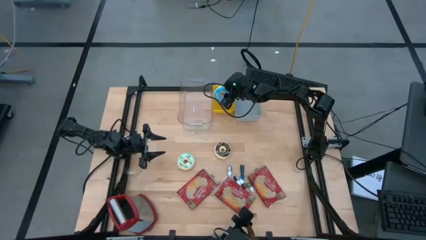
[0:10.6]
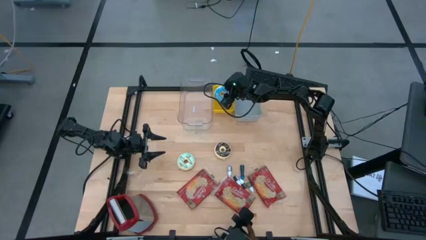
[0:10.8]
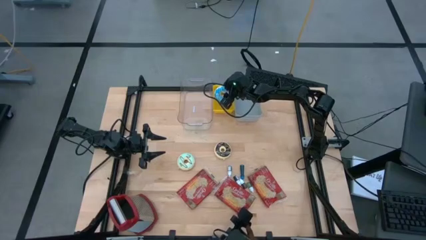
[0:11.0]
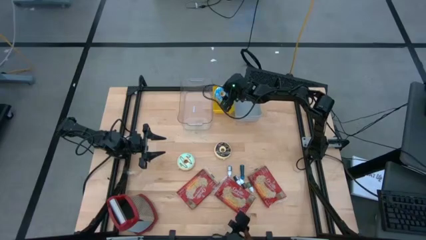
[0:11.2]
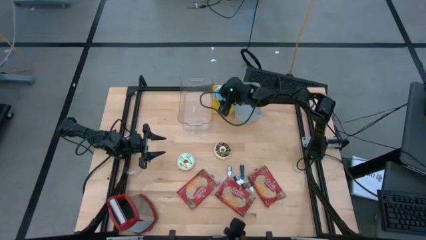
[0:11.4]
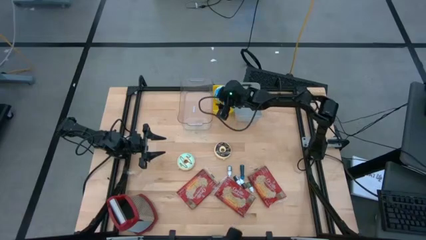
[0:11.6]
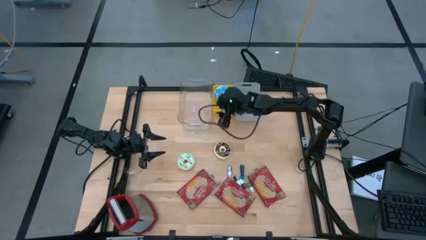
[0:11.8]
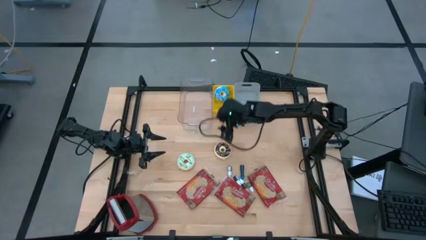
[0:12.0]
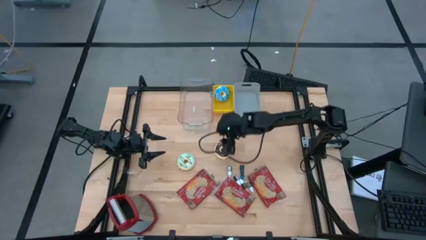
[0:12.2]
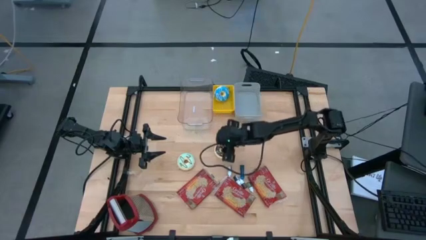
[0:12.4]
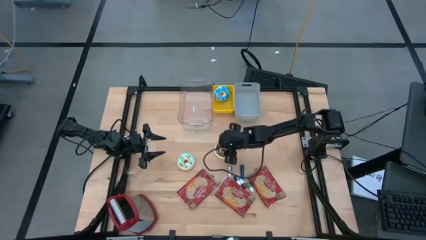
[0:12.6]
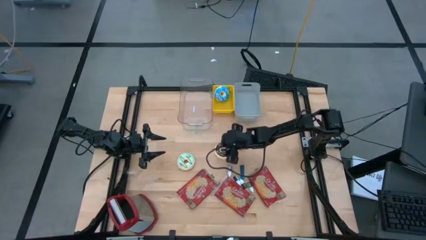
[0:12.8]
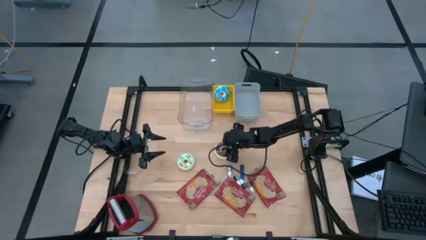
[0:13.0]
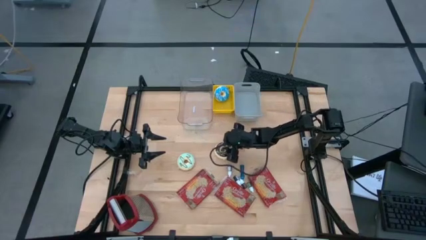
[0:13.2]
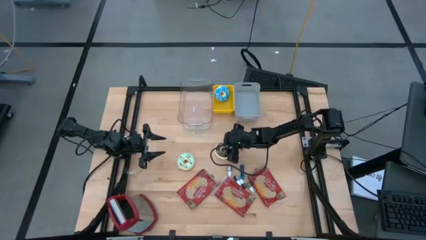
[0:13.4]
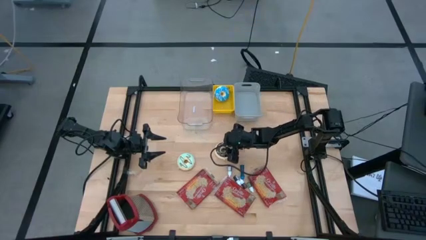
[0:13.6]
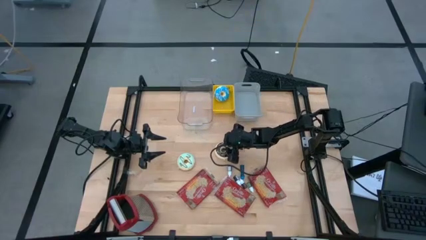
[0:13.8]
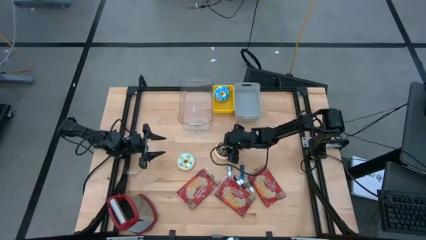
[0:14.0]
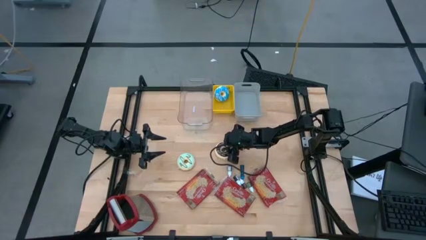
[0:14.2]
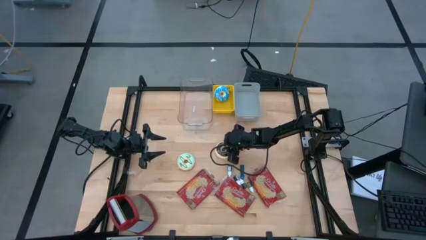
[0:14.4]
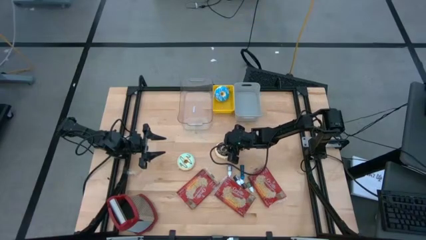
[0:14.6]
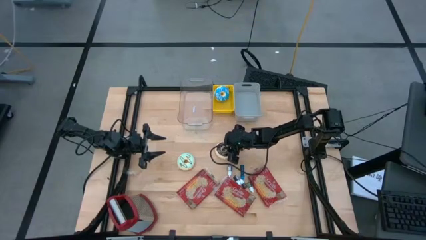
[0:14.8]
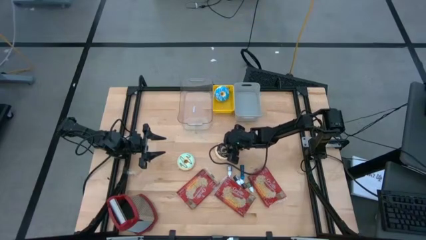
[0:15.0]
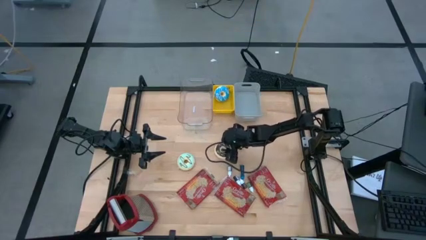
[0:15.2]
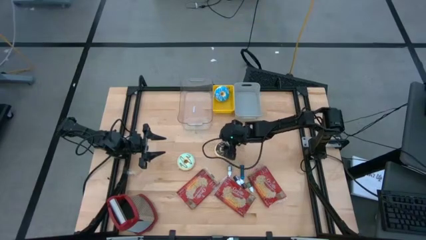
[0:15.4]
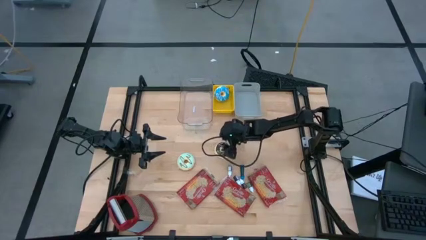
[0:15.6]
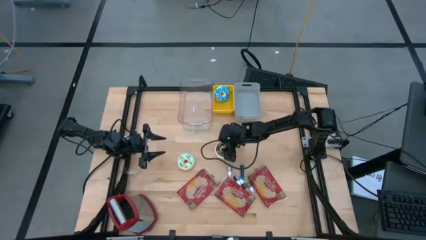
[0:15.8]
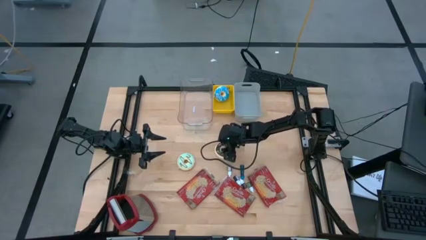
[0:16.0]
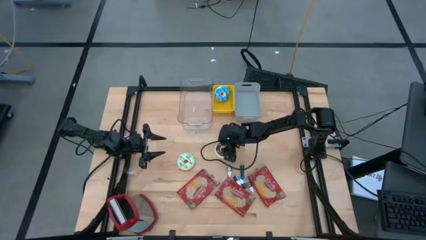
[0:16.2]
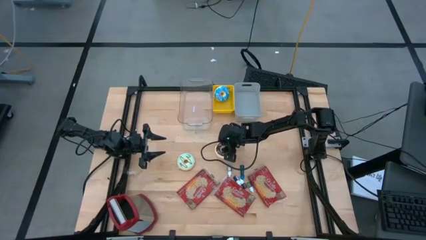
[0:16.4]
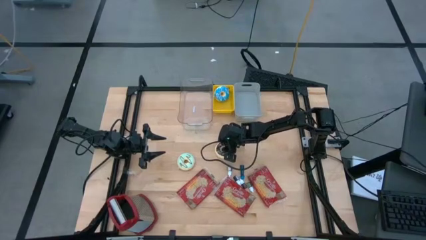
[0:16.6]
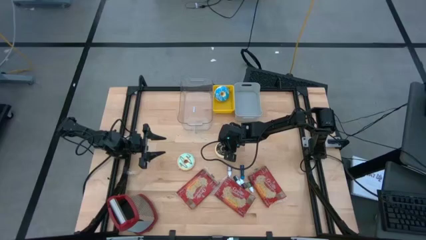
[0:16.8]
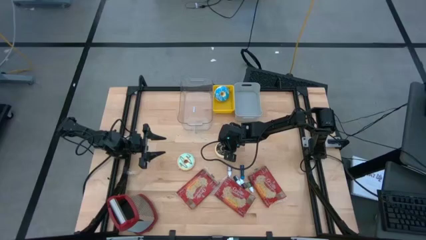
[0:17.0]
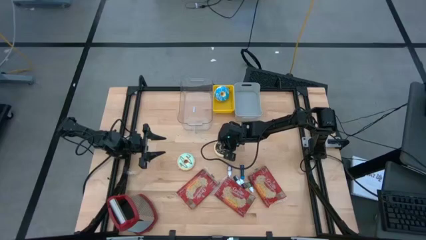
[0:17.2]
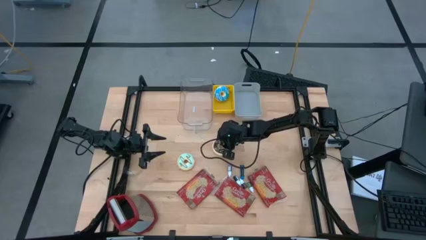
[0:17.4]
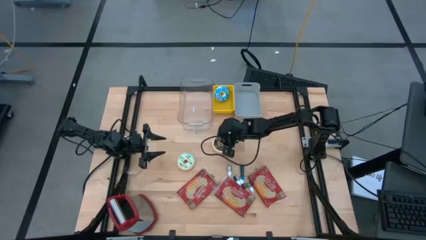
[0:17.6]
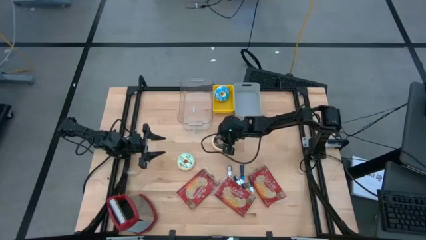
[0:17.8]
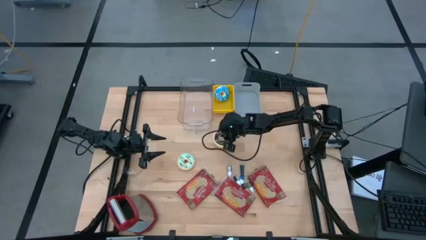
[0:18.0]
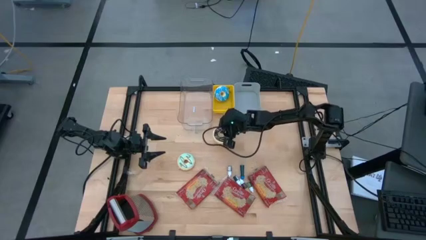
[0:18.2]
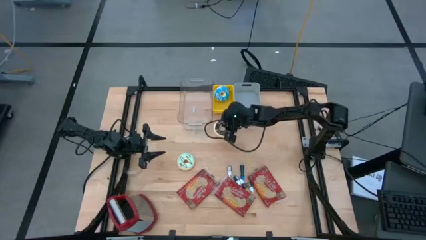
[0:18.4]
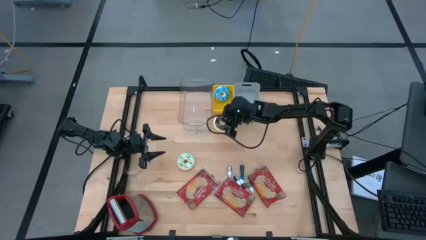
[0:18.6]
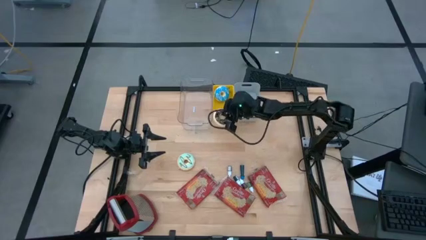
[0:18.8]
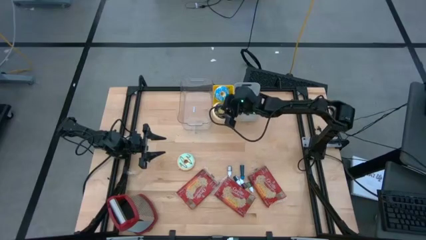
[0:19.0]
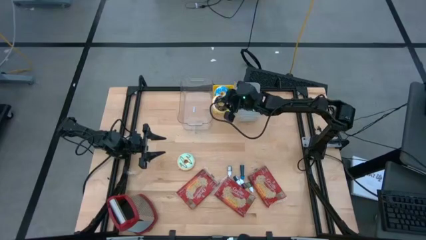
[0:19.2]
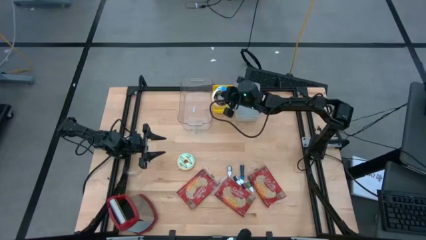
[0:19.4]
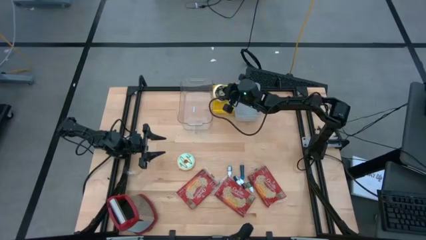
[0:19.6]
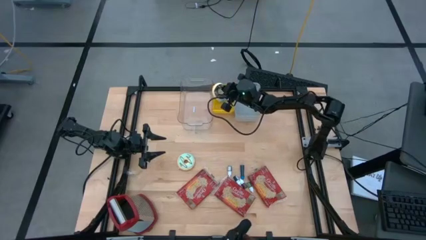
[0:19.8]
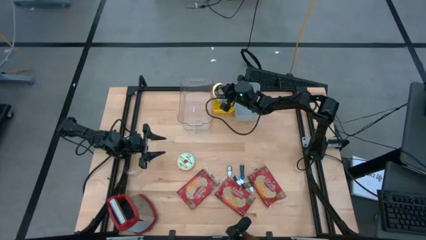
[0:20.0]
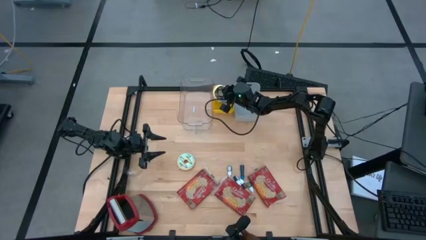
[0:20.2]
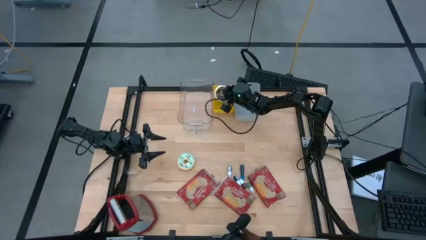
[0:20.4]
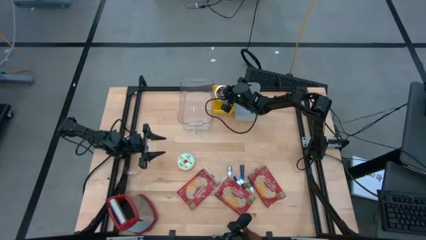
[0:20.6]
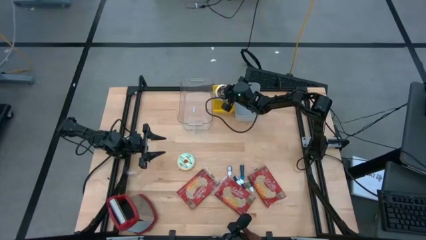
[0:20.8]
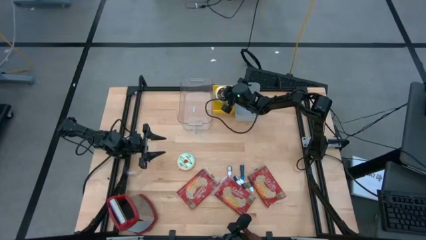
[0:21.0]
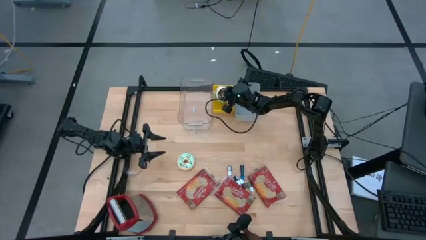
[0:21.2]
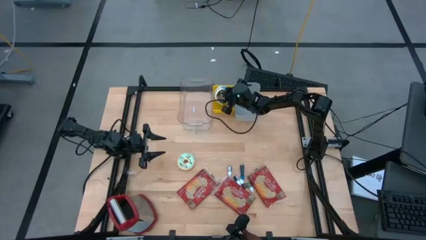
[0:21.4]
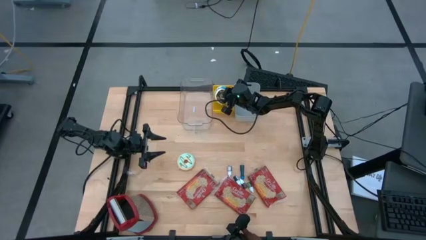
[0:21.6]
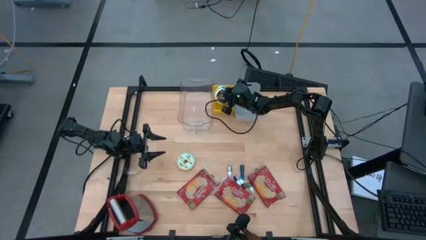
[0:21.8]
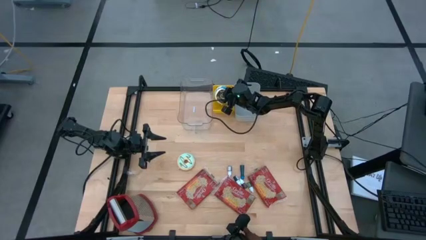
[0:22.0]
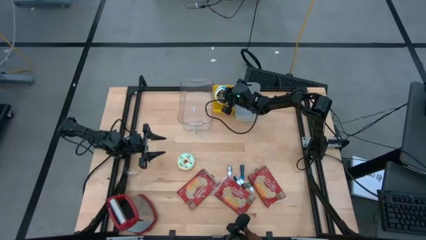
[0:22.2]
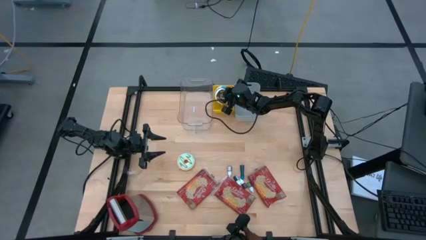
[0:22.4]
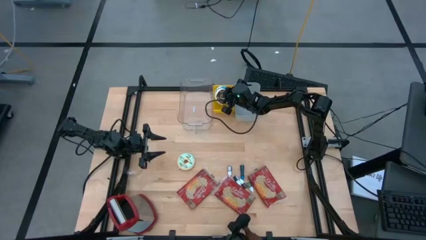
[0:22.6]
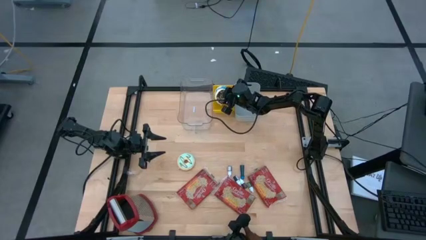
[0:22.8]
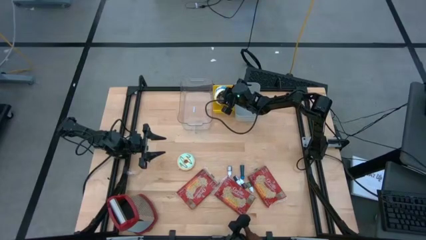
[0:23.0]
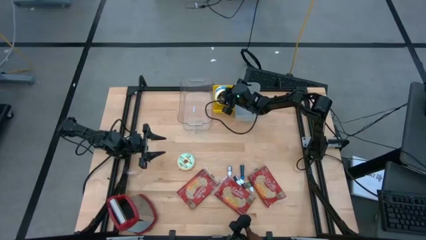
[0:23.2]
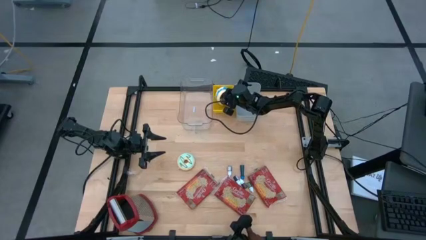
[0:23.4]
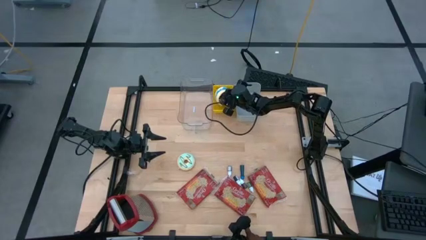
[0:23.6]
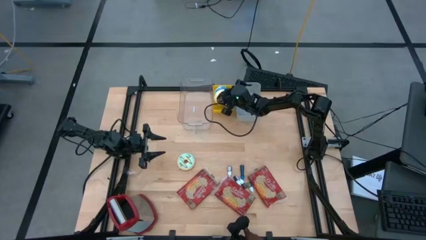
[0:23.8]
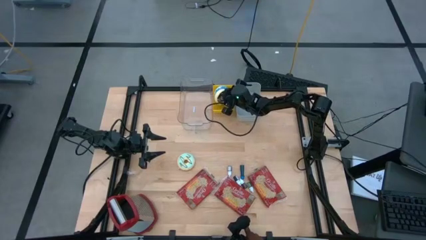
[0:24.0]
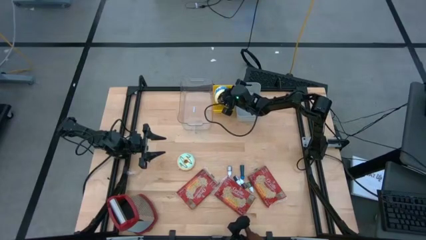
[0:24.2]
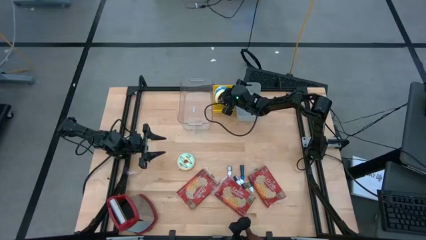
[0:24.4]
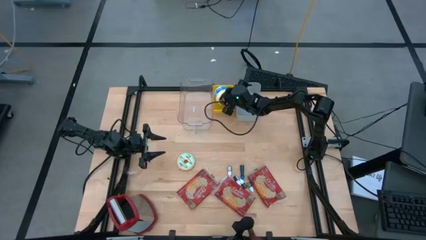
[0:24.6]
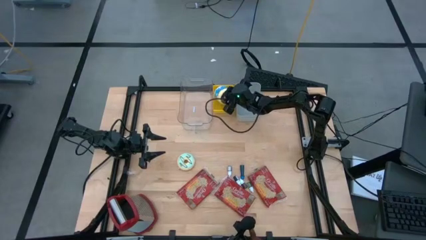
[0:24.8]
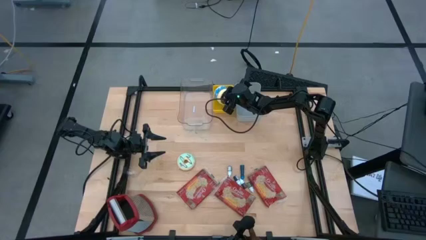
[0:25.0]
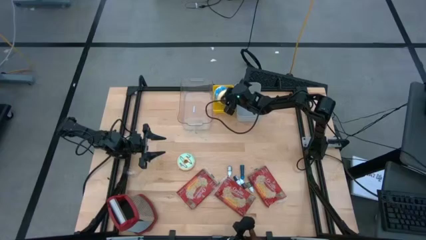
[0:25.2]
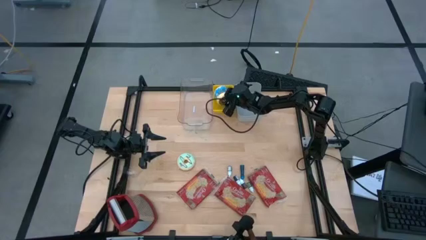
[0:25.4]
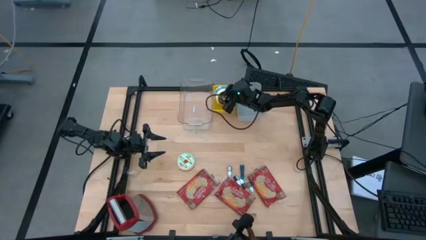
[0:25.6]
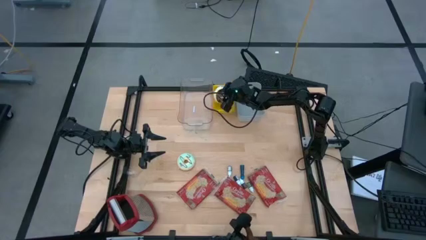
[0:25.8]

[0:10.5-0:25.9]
Put the black donut into the yellow bin
